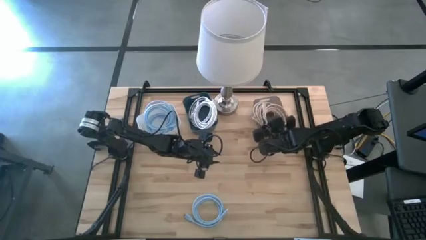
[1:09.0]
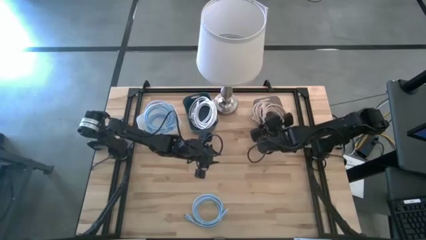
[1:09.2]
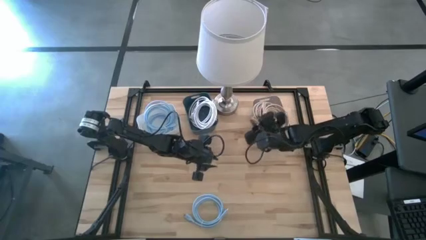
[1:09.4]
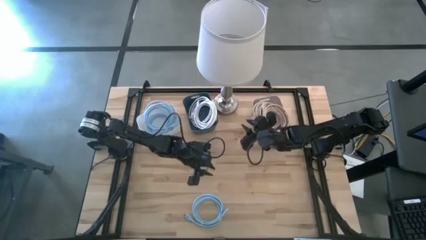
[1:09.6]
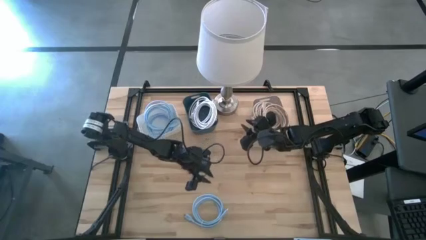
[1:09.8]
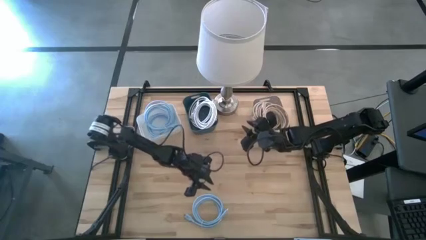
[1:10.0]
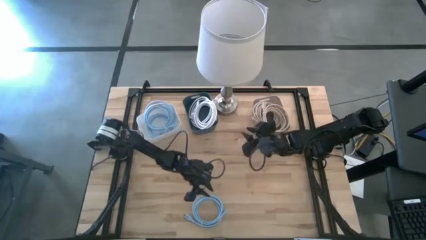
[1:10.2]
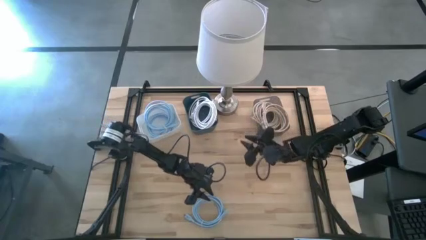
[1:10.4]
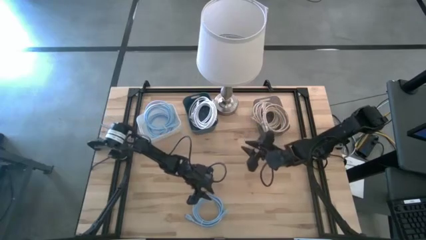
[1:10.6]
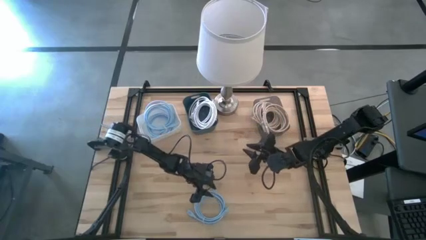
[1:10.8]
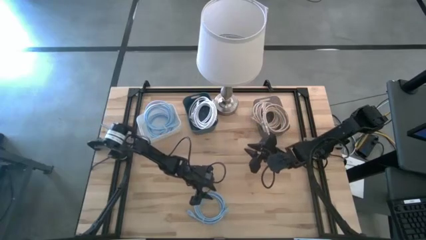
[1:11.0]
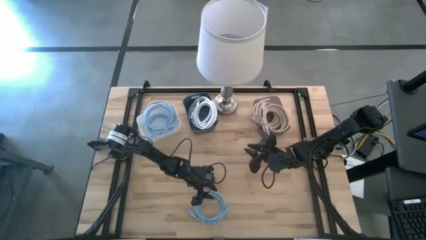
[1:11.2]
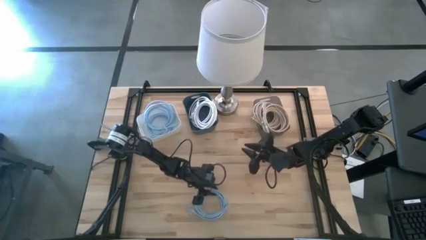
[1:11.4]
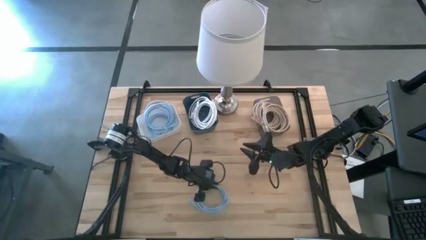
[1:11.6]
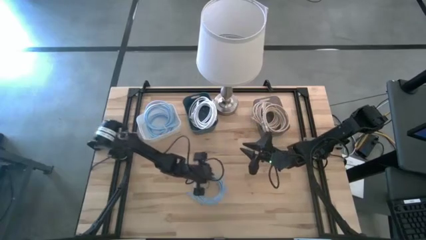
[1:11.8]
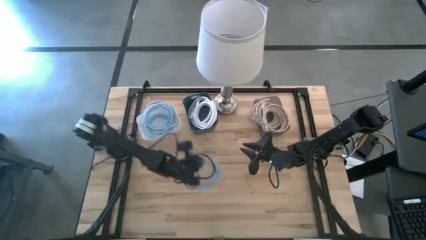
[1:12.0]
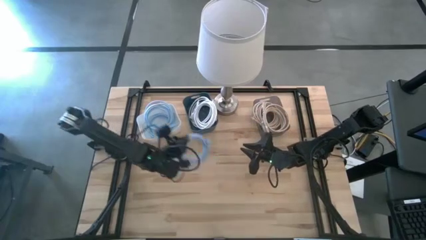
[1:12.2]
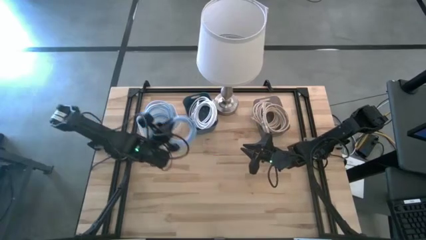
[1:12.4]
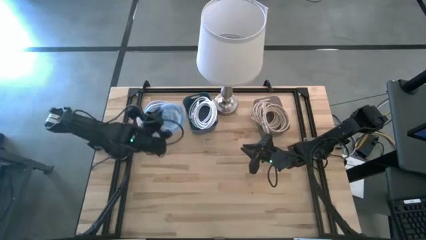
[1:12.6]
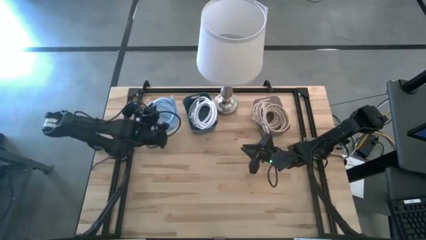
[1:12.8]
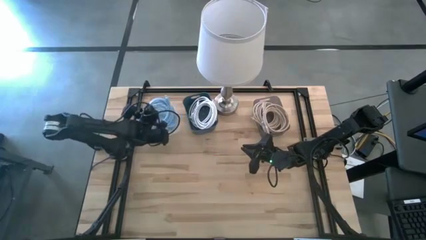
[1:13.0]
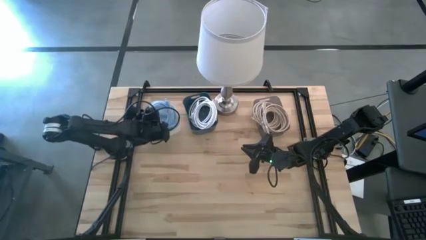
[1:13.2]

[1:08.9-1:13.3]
Task: Pick & Place USB Port
Put the blue charger cable into the white bin

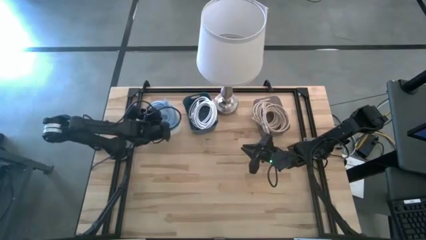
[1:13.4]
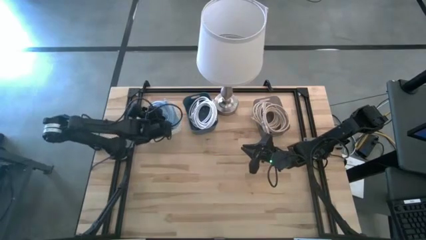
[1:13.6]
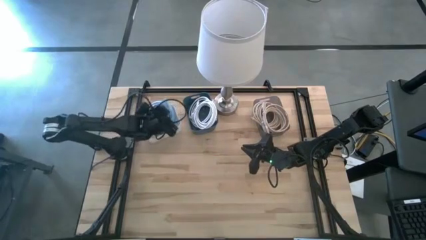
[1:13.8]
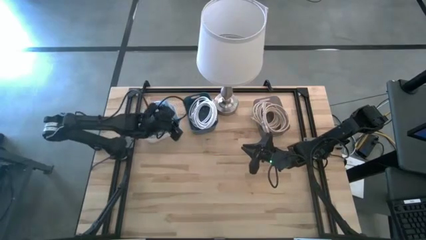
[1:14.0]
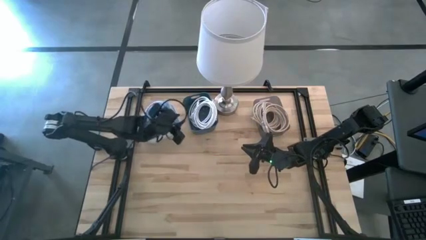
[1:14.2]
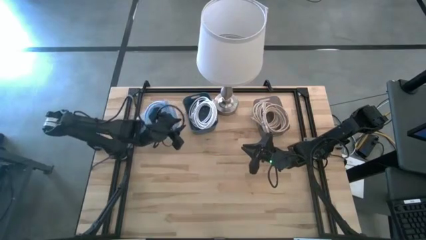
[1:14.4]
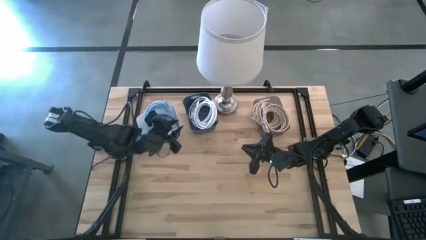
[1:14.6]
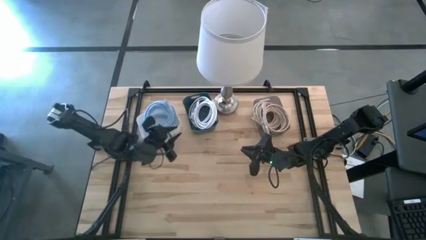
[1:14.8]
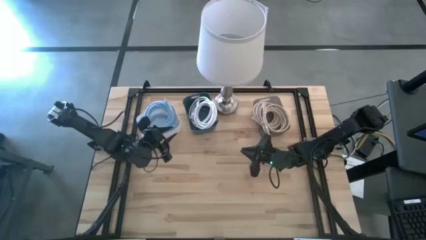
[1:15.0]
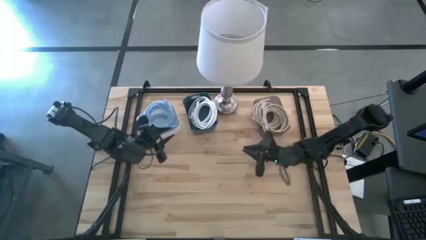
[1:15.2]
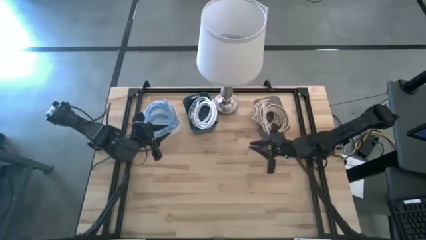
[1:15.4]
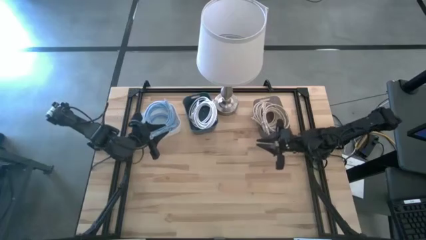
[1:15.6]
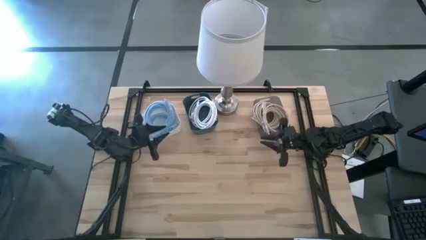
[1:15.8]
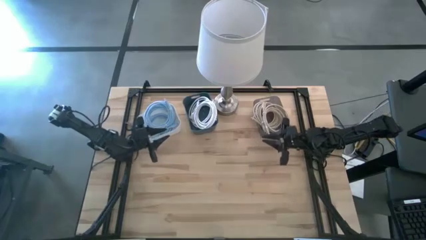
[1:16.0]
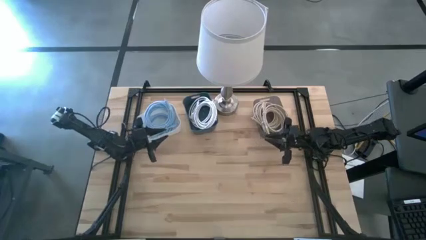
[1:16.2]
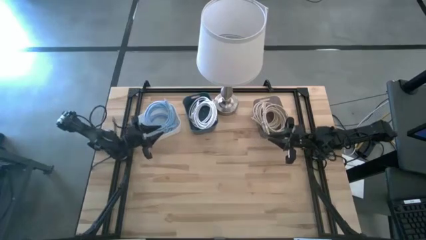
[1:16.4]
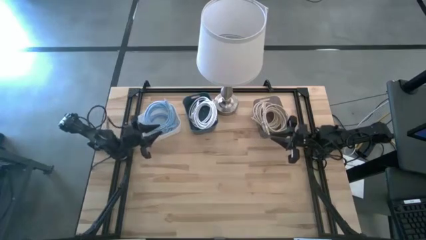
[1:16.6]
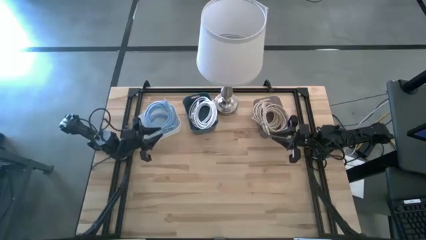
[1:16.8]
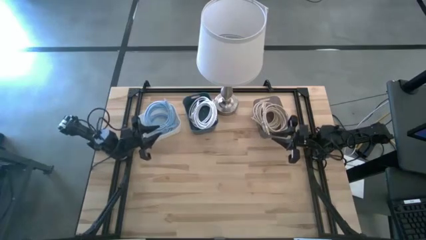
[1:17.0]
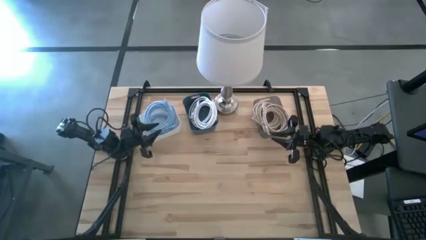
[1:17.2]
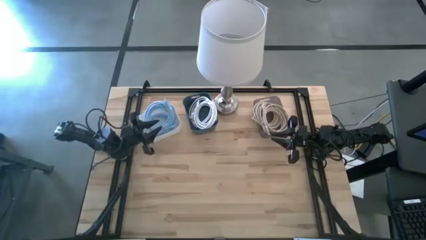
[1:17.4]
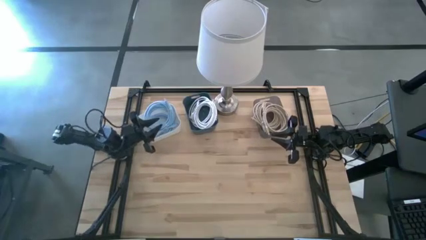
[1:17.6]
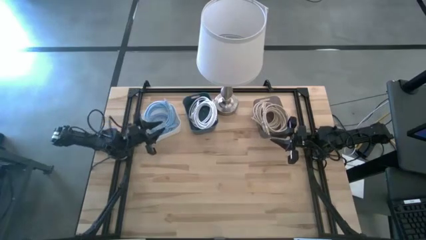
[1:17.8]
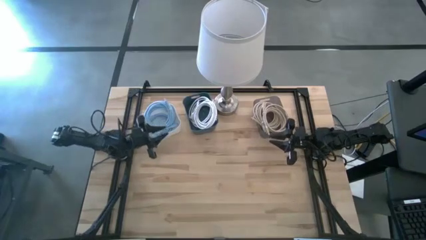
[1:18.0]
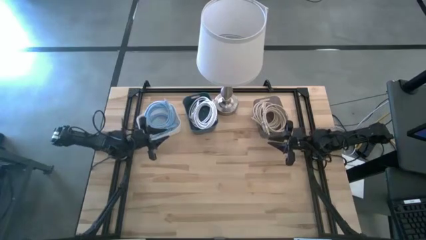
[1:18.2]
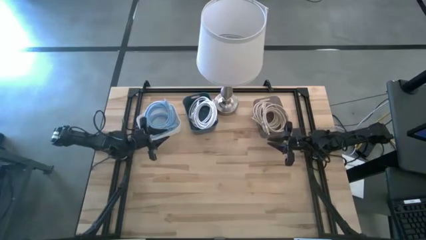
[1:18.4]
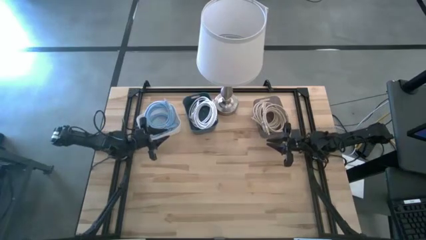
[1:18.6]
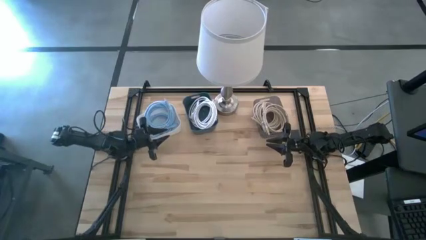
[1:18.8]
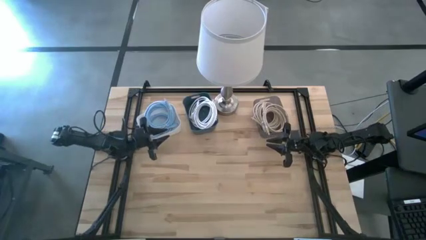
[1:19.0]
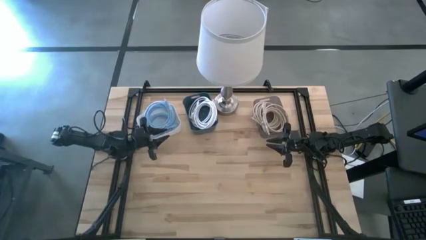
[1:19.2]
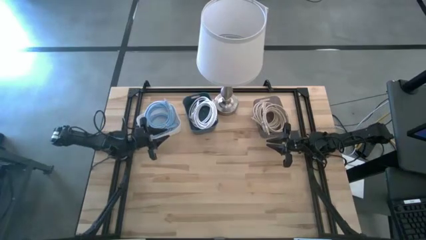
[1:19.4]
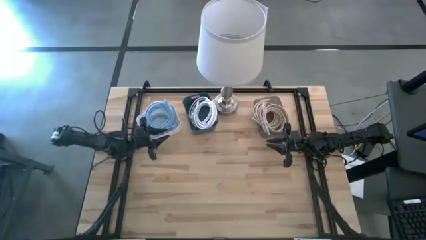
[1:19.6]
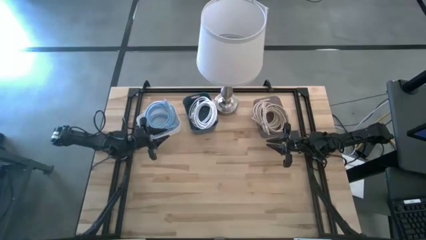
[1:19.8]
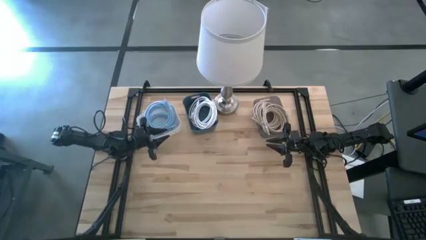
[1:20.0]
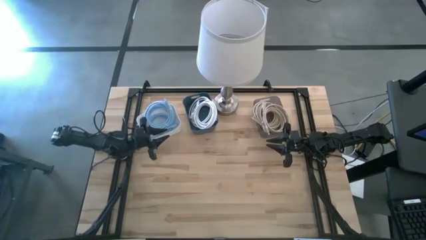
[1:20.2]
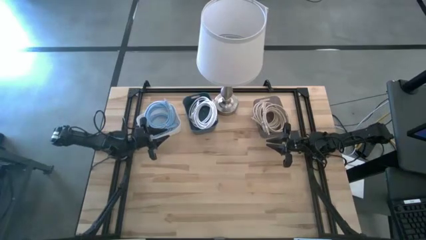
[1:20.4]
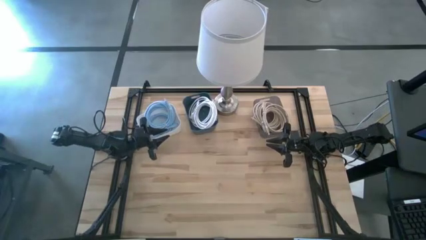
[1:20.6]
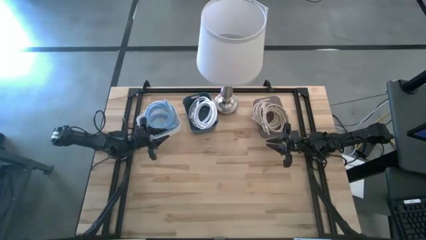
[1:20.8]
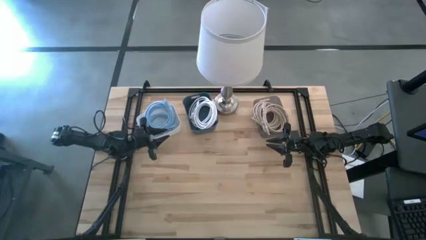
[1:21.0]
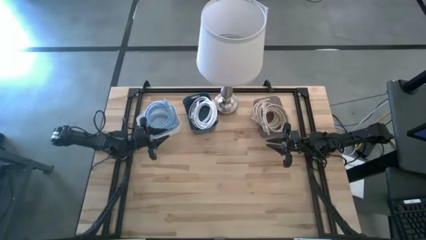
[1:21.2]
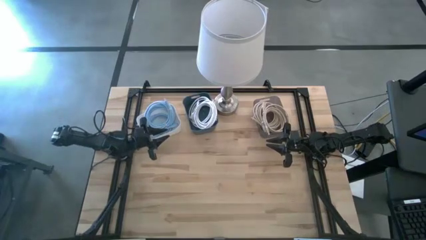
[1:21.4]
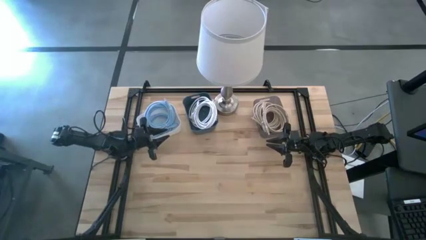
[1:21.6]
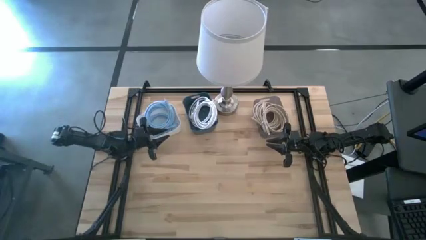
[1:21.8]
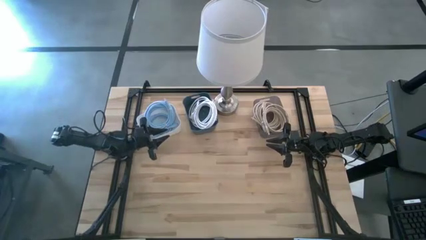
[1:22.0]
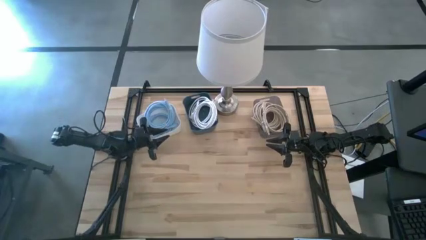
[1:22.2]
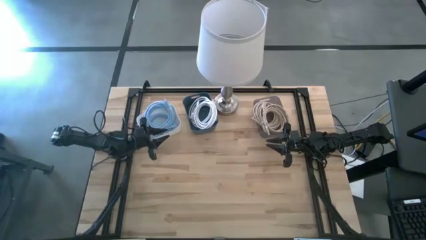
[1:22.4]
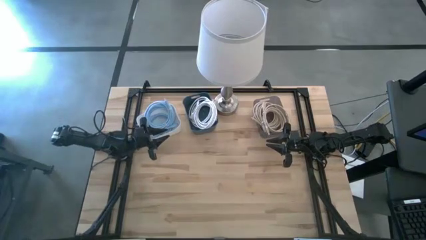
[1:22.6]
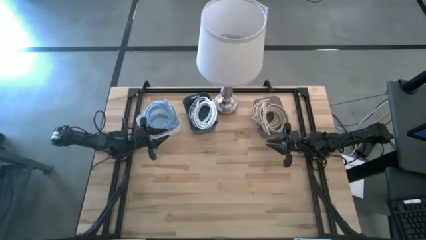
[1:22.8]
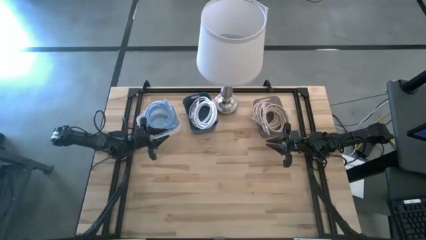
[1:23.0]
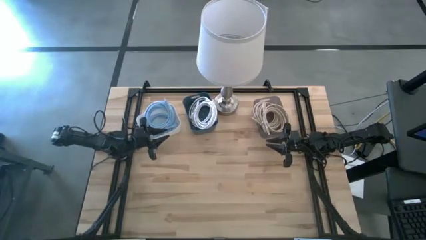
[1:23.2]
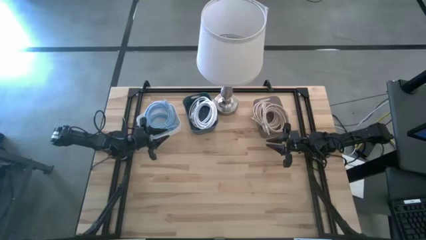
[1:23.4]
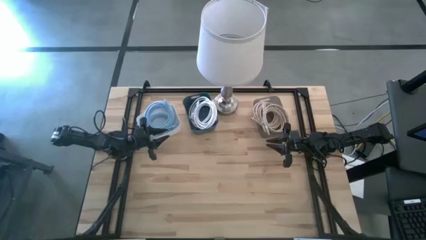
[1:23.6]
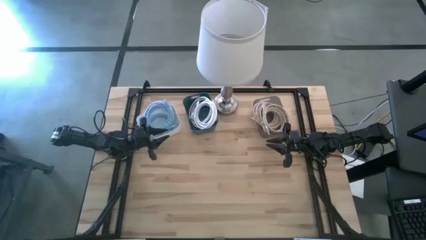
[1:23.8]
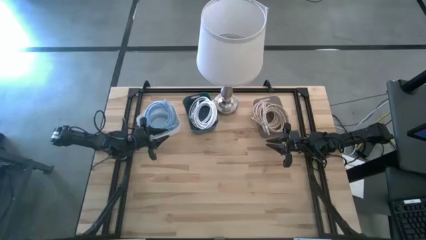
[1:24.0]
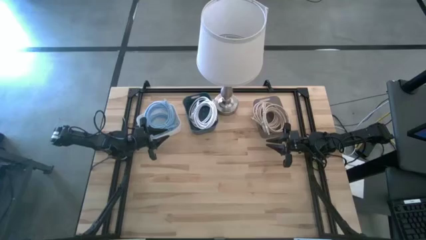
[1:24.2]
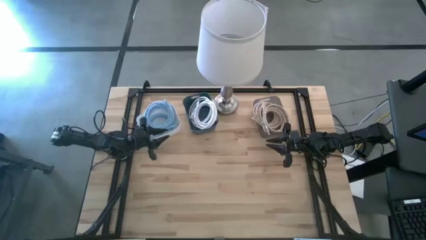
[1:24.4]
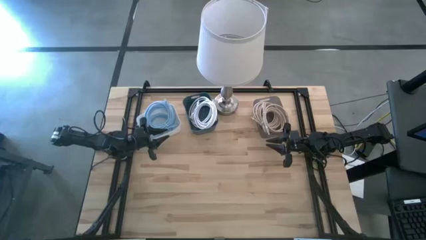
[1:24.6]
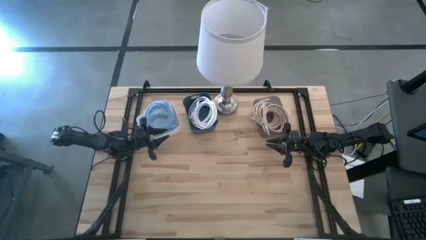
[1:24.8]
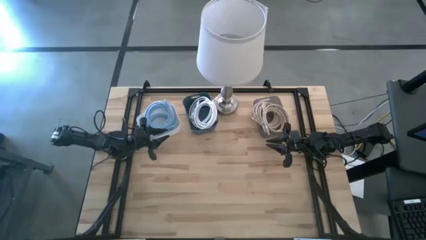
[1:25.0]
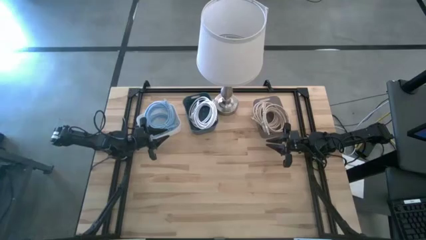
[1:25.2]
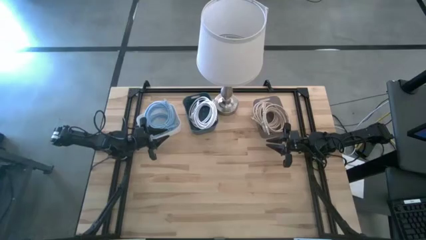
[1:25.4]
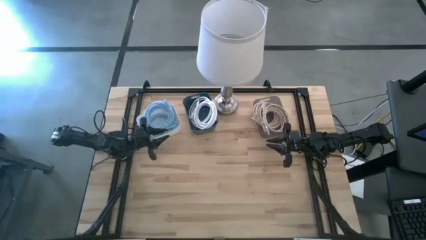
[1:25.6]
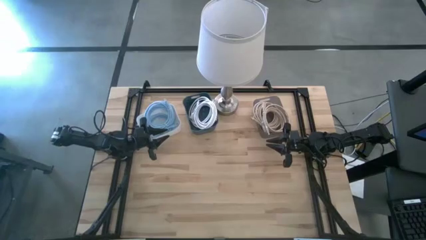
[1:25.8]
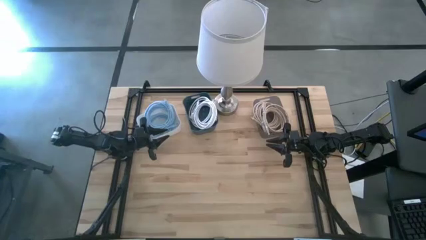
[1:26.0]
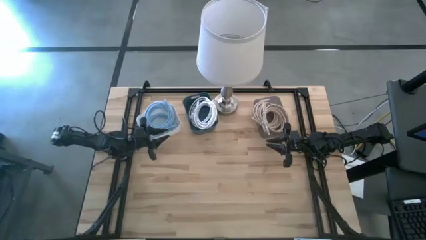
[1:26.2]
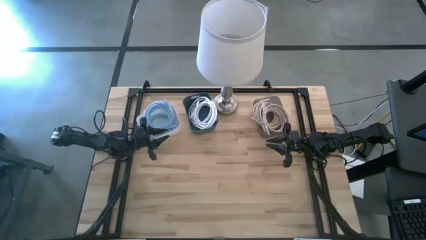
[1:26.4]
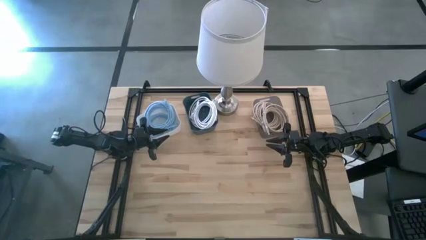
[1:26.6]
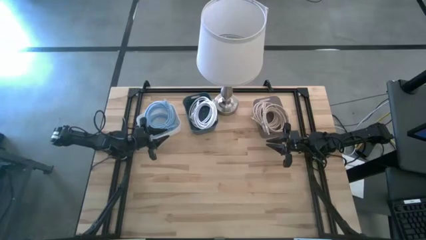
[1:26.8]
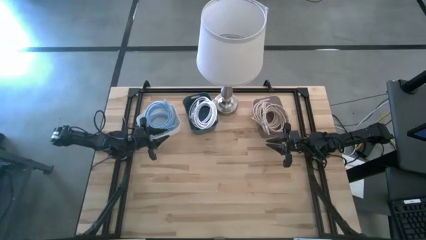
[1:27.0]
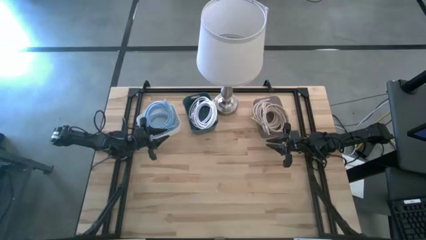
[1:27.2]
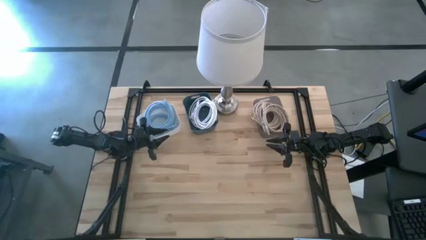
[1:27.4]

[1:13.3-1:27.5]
Return to Home Position
